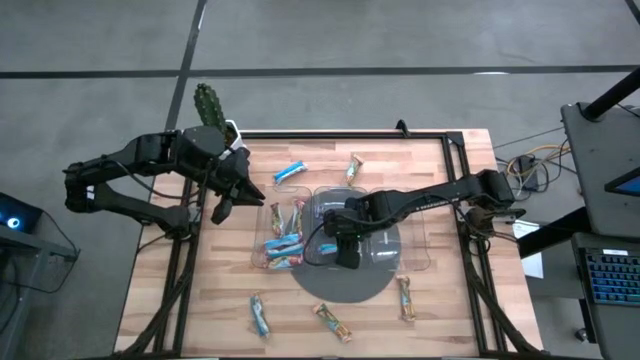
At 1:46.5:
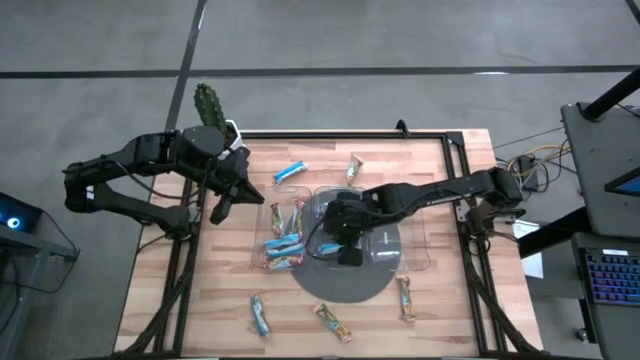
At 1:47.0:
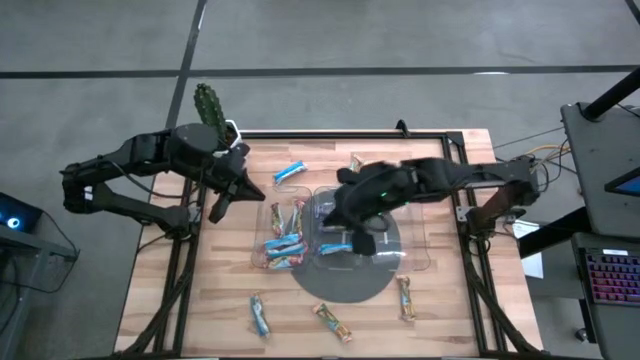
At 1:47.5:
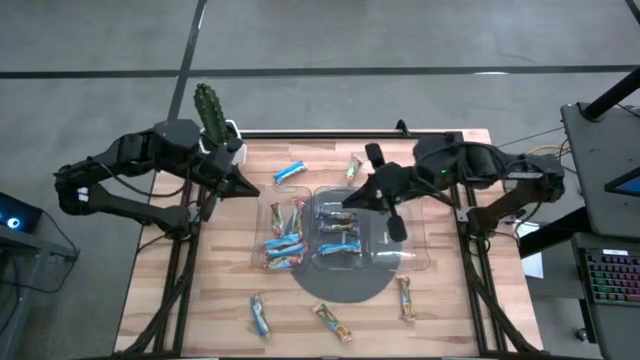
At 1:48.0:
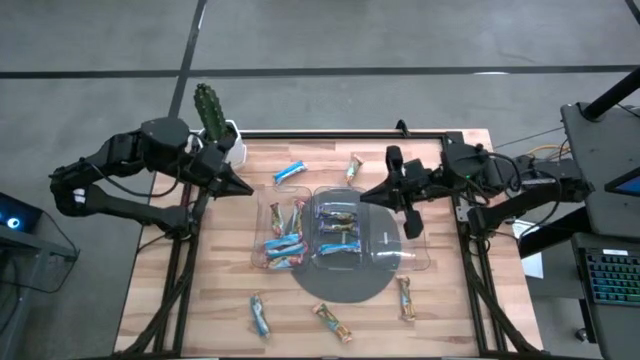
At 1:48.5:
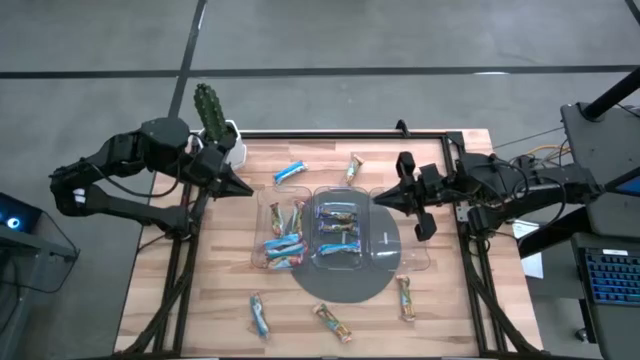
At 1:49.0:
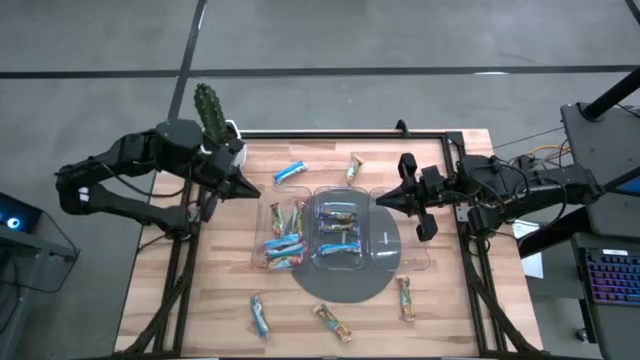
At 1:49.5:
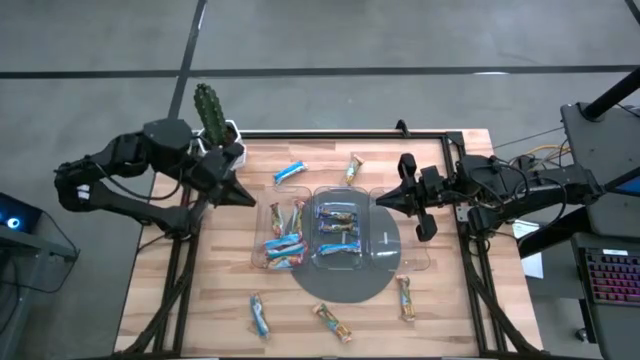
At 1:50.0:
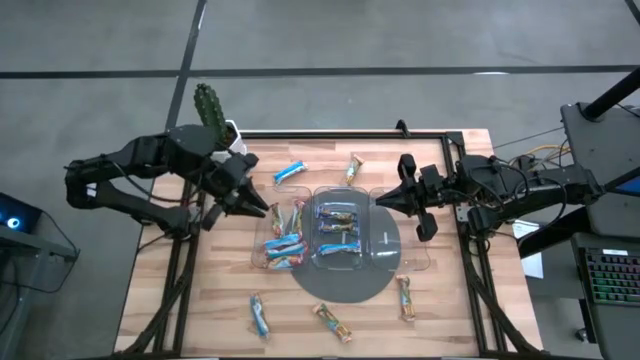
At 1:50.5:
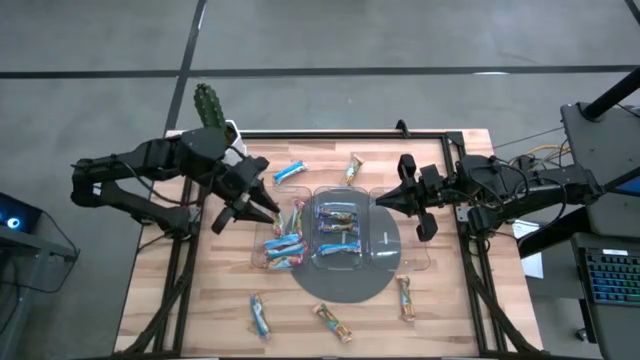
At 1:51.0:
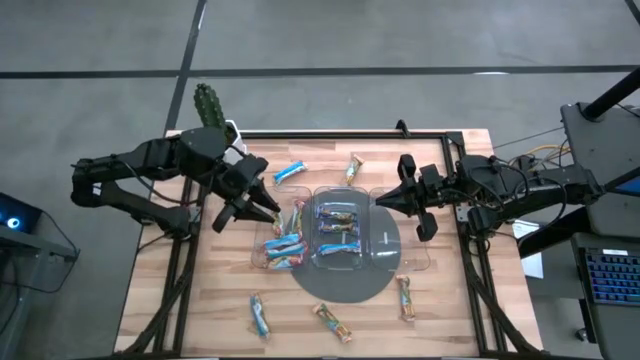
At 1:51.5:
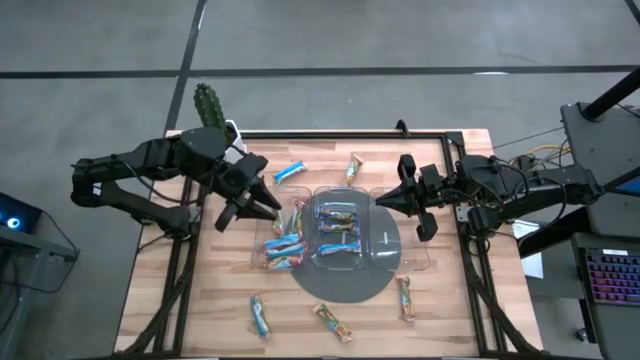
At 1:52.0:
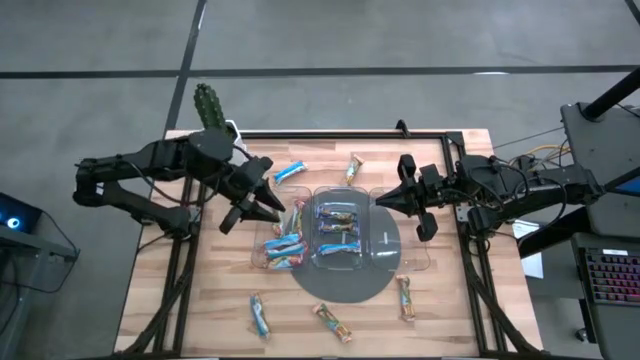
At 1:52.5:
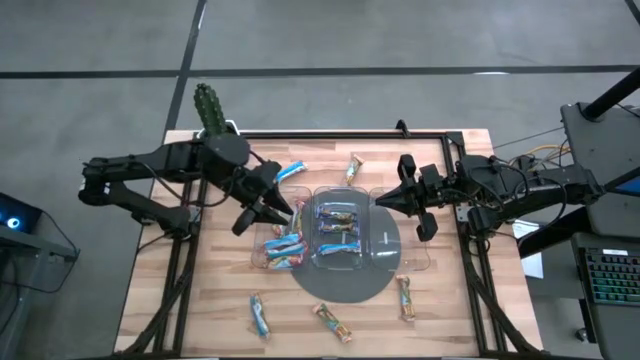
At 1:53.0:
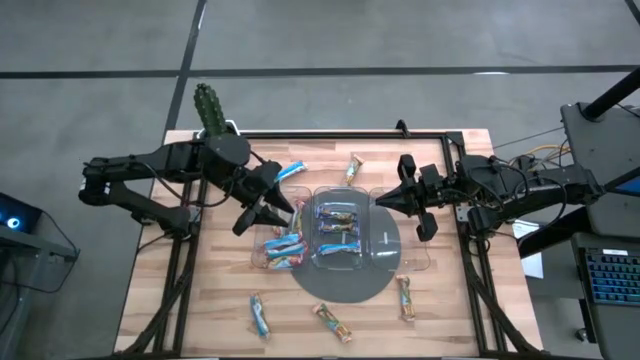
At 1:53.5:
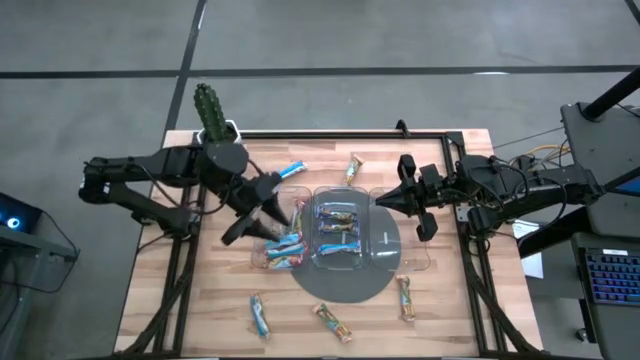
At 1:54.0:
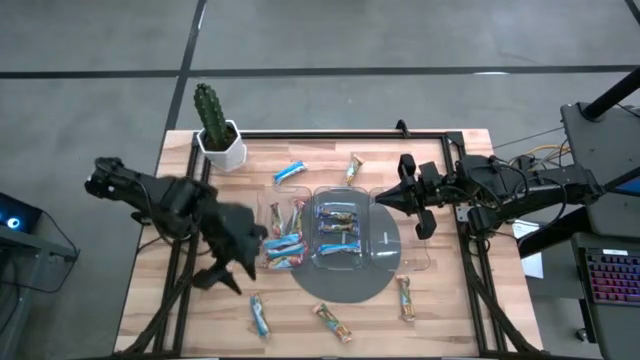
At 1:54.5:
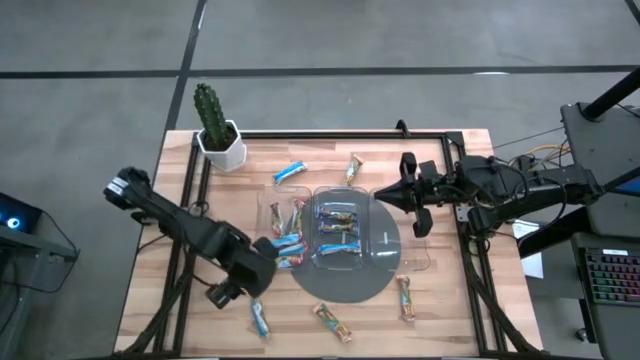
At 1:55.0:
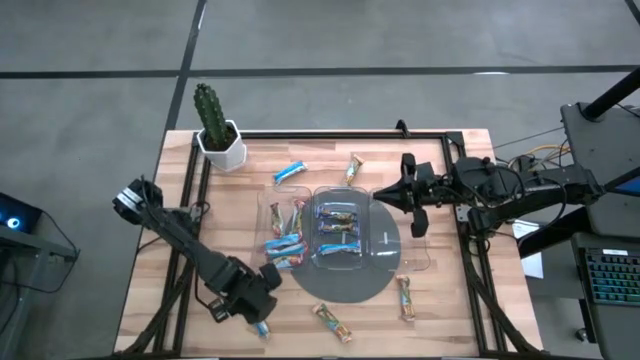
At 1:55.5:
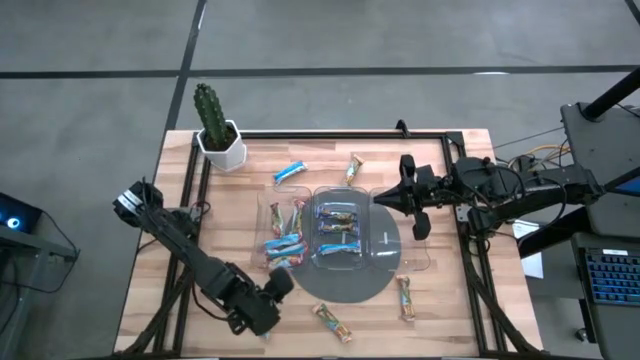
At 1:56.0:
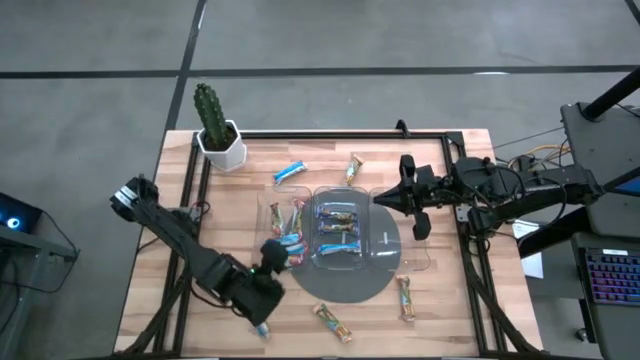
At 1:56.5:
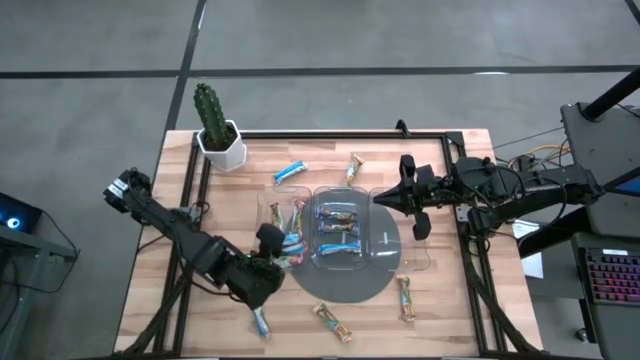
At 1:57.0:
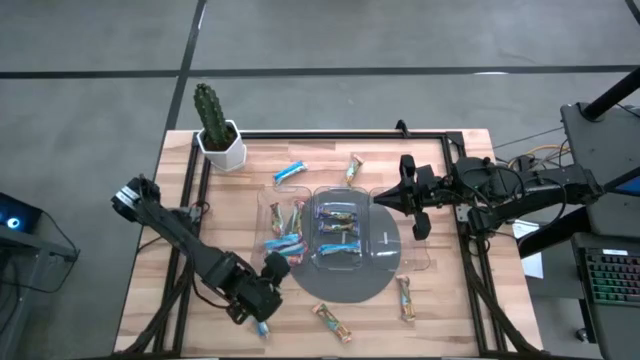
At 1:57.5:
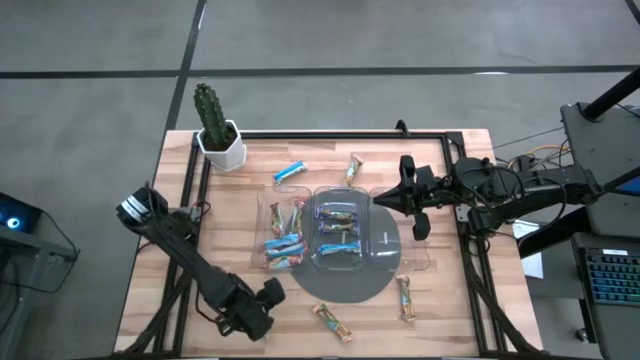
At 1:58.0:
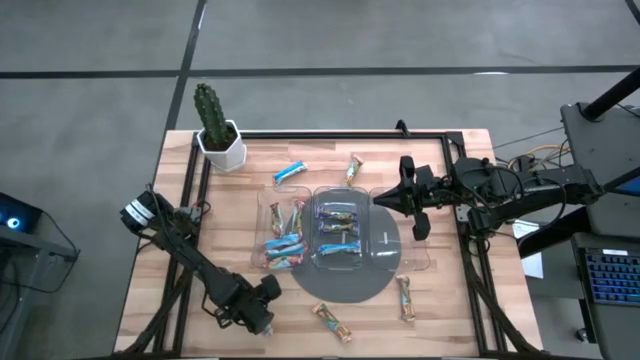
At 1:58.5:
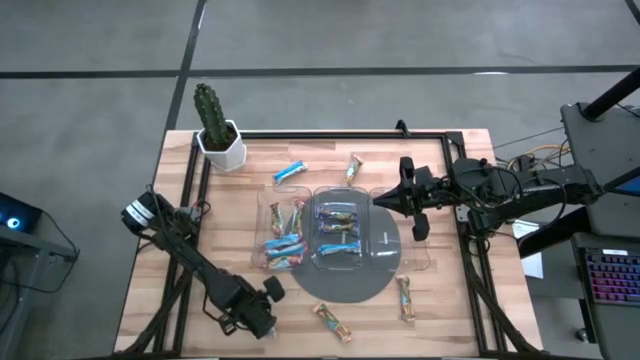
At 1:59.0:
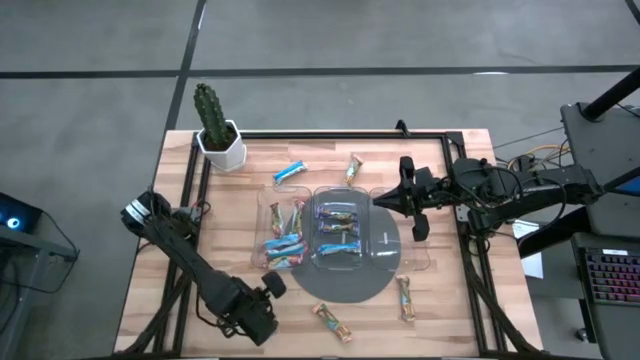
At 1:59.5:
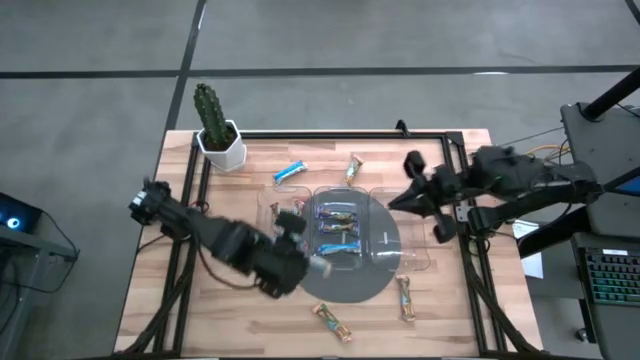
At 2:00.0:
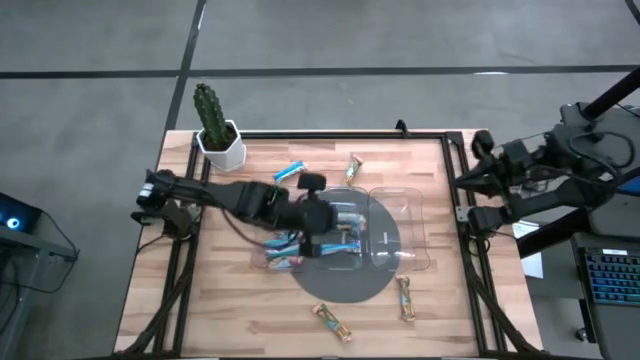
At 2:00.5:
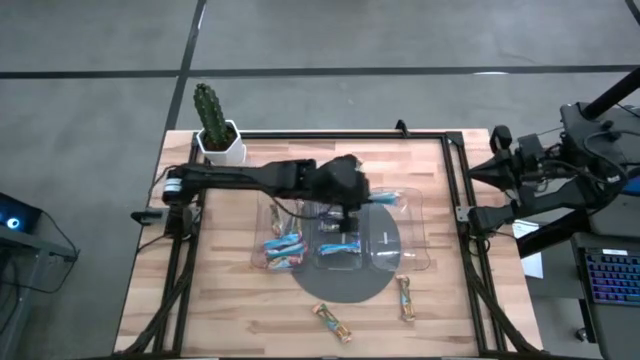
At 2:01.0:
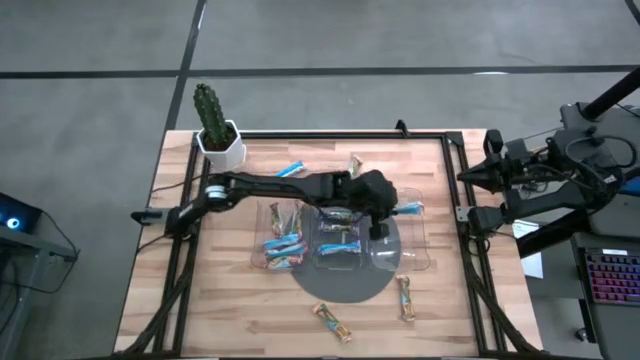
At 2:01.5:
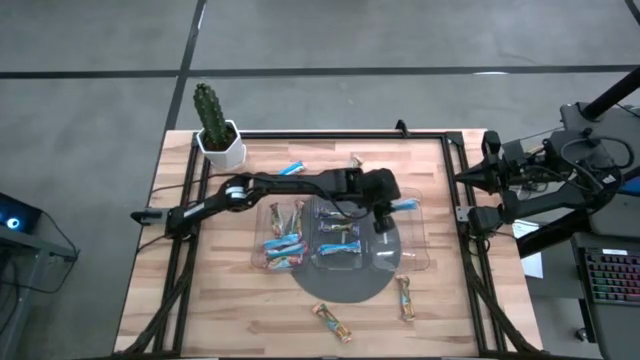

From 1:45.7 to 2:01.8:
Task: Pick and place Granola Bars by type
Put the yellow granola bar into the right transparent bin

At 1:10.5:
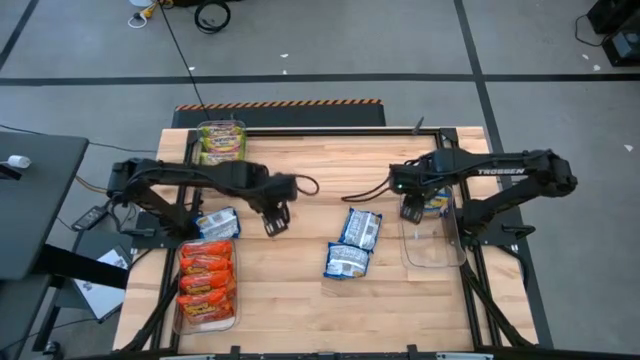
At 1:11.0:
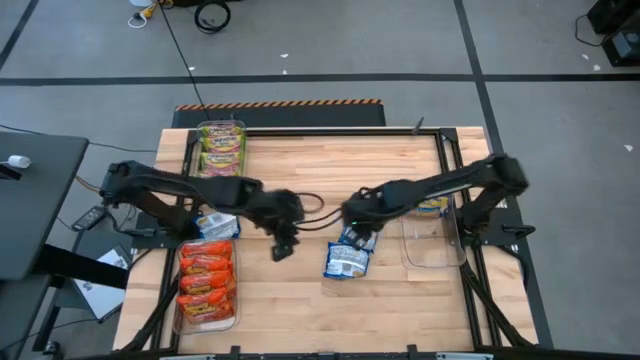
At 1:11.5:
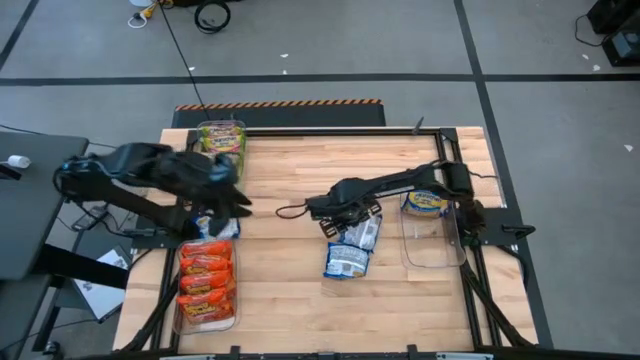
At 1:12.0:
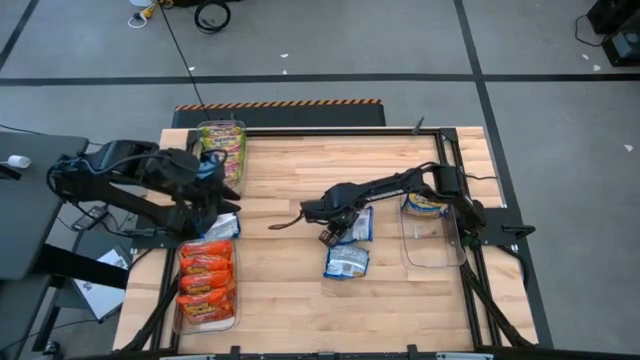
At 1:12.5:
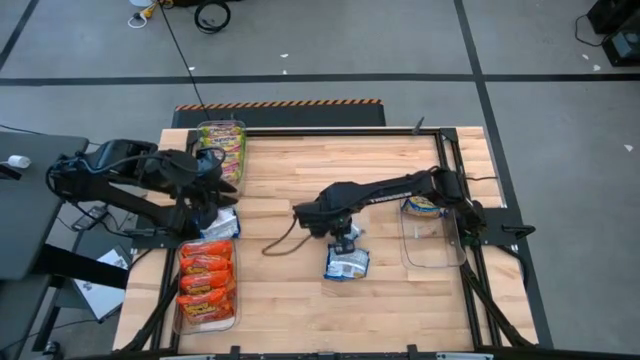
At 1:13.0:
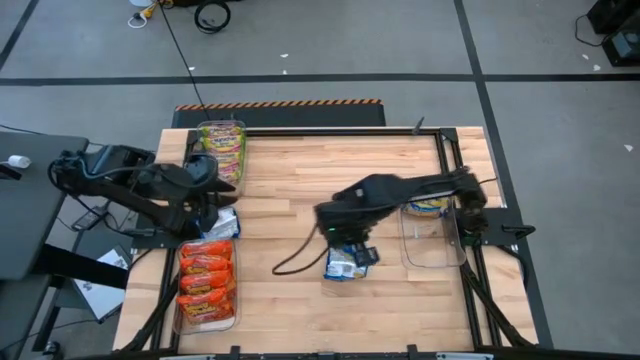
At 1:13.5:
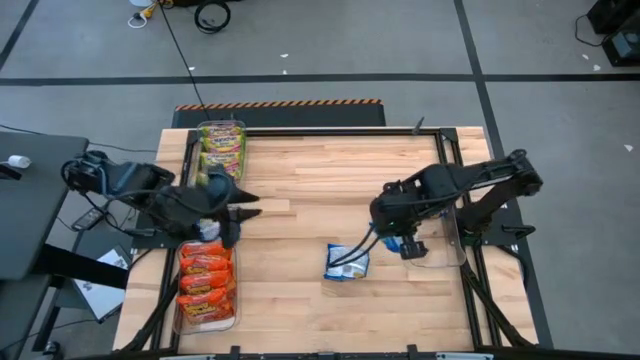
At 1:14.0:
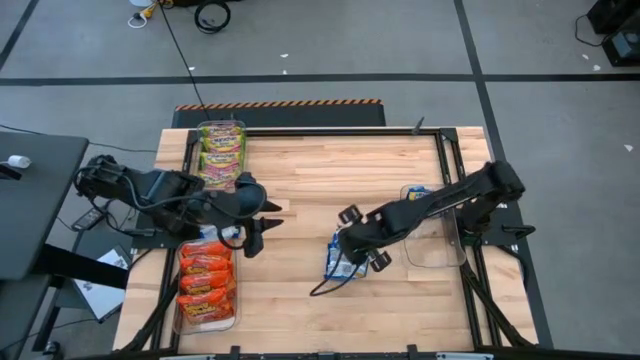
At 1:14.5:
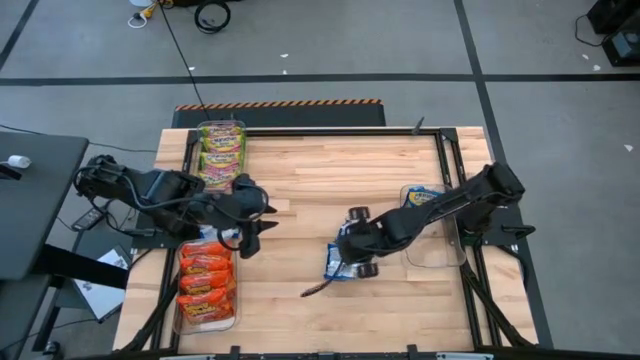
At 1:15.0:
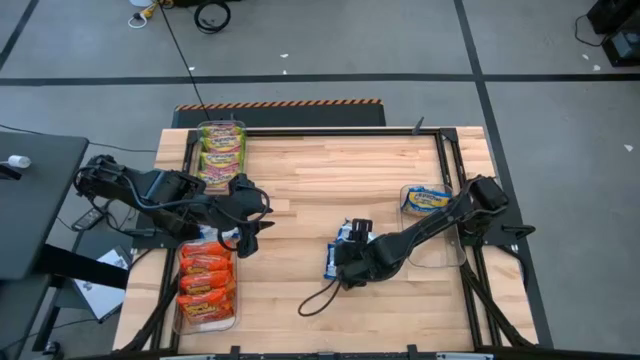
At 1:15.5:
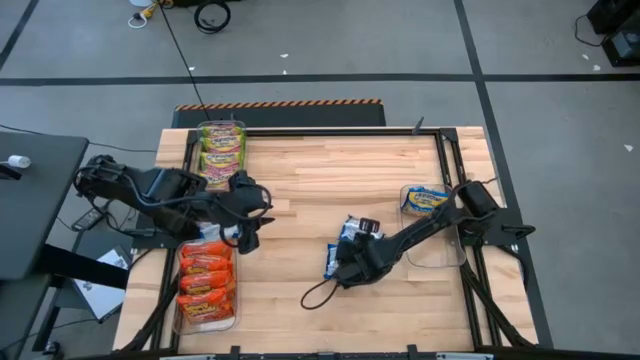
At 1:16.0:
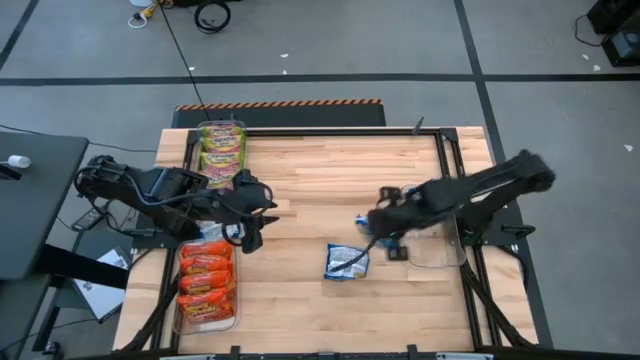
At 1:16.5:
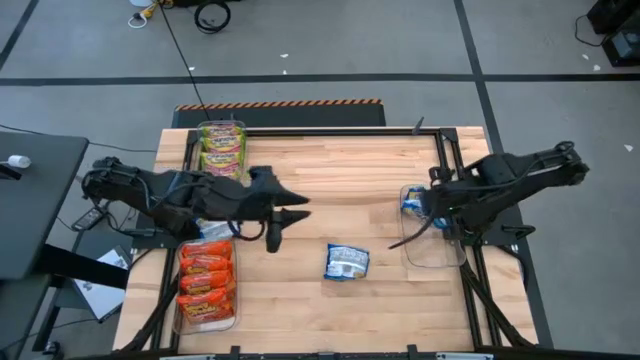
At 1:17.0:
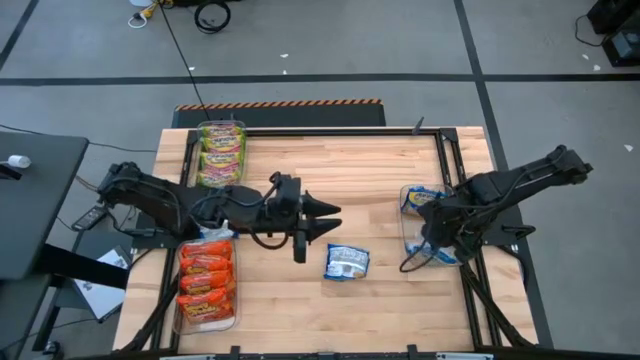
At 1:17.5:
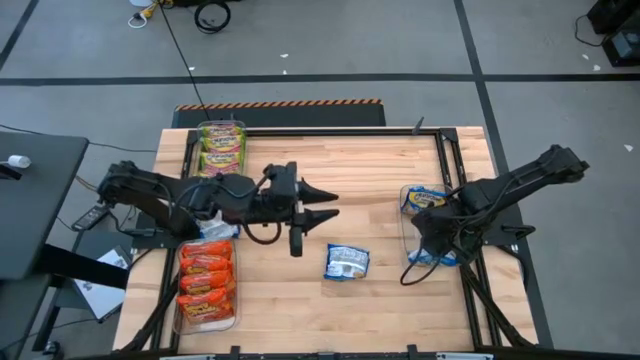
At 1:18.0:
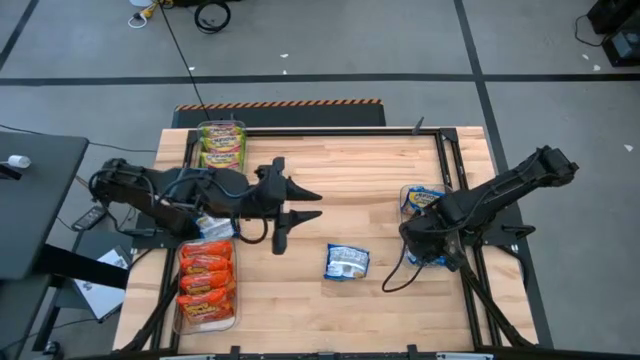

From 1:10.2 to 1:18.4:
Task: Sort Maruchan noodles
Put the top right blue noodle pack into the right transparent bin
